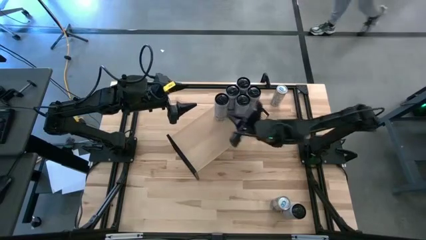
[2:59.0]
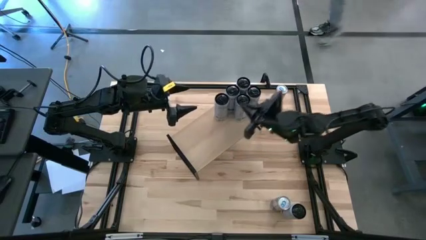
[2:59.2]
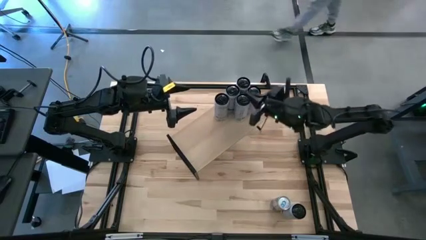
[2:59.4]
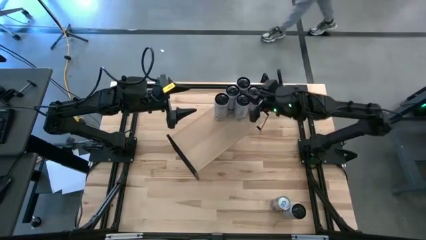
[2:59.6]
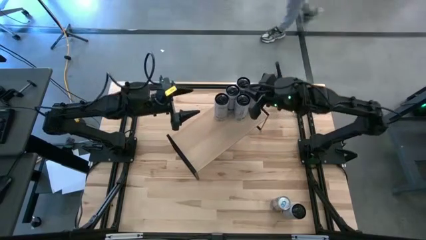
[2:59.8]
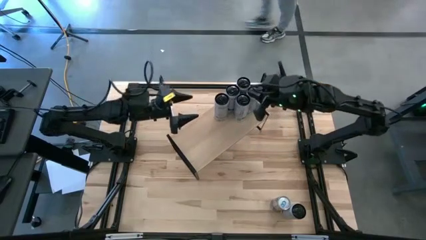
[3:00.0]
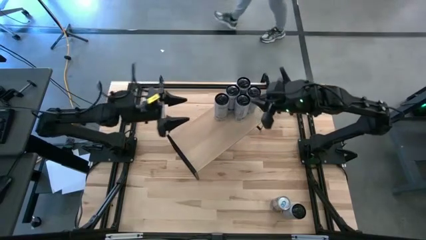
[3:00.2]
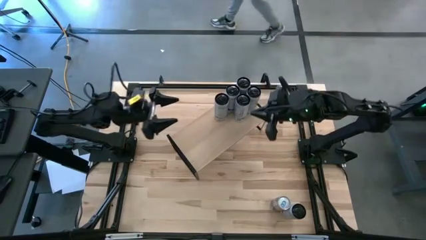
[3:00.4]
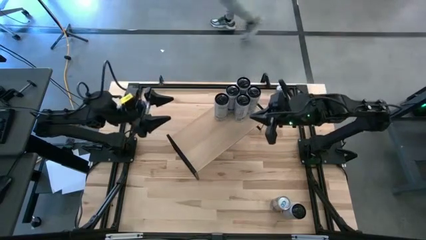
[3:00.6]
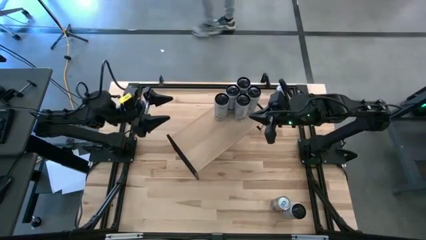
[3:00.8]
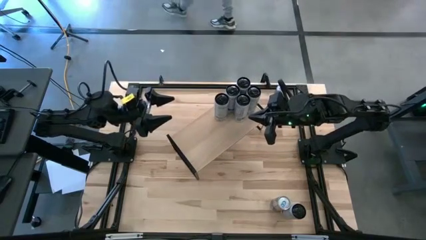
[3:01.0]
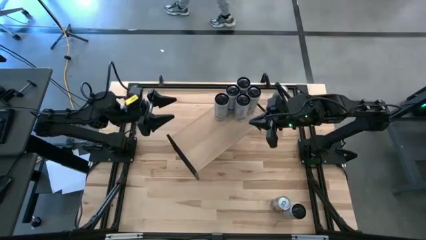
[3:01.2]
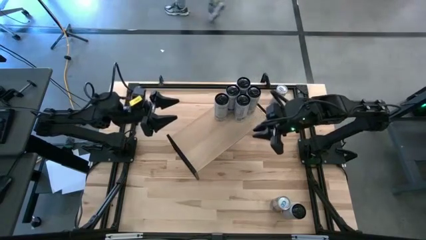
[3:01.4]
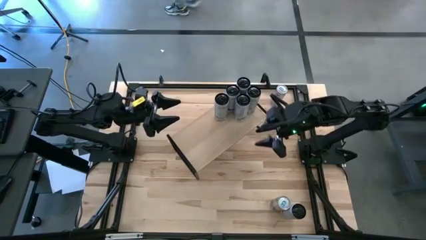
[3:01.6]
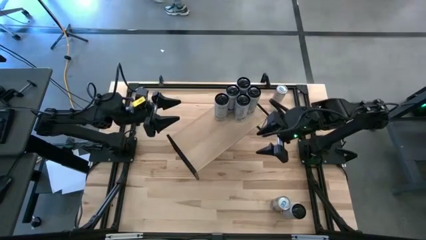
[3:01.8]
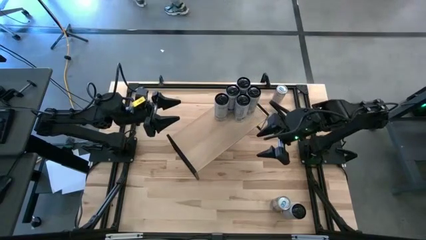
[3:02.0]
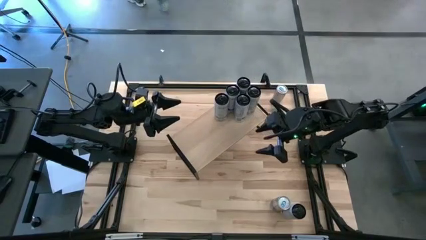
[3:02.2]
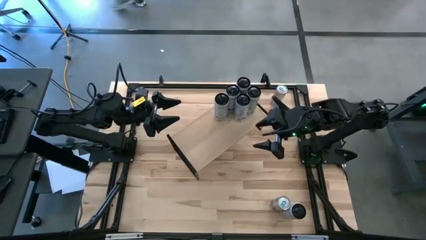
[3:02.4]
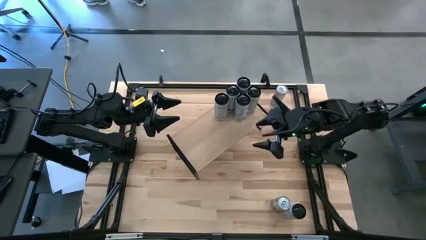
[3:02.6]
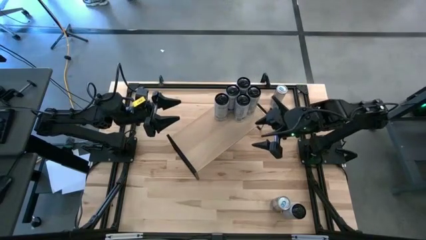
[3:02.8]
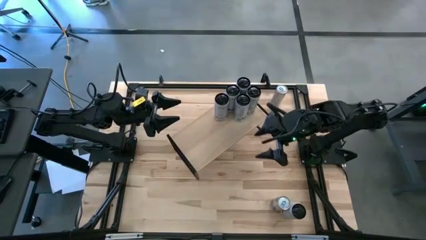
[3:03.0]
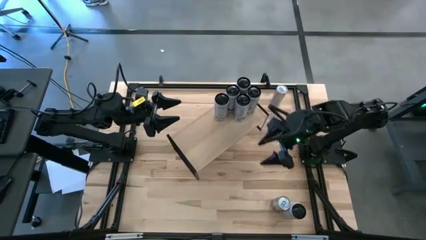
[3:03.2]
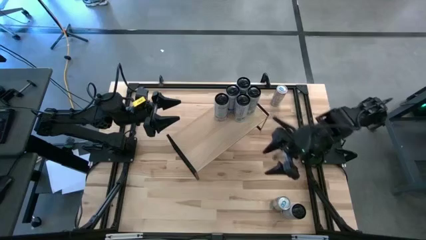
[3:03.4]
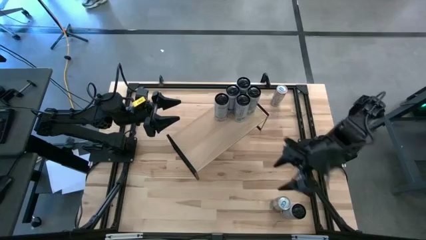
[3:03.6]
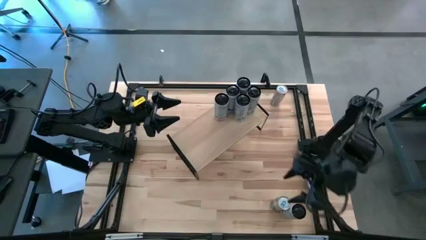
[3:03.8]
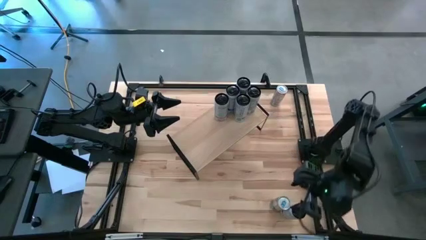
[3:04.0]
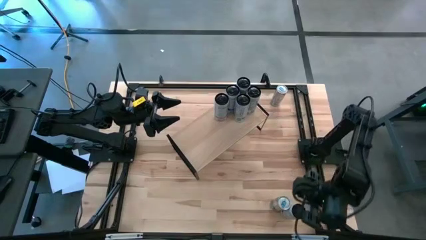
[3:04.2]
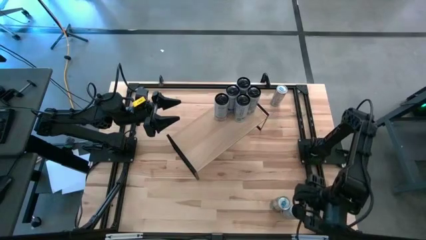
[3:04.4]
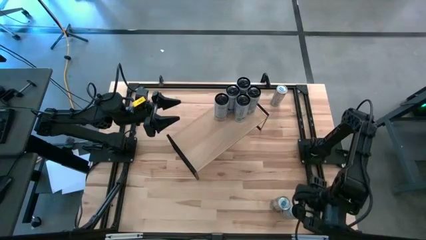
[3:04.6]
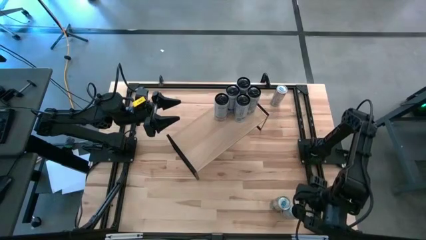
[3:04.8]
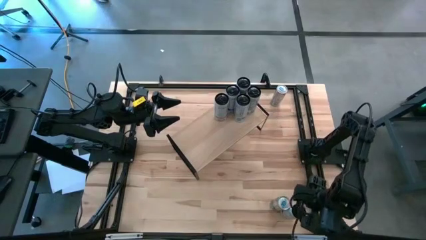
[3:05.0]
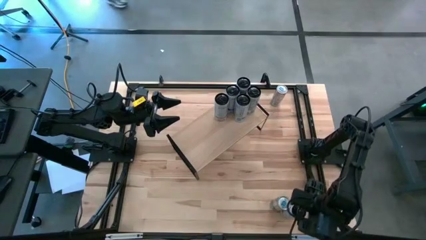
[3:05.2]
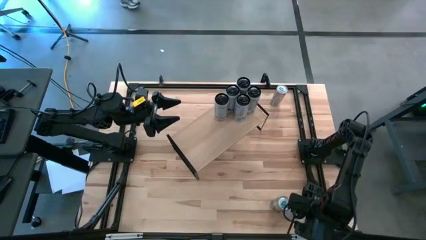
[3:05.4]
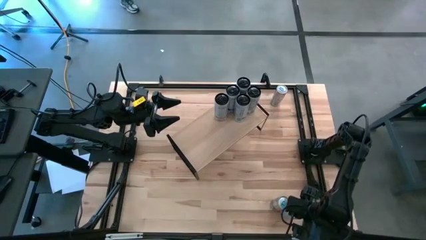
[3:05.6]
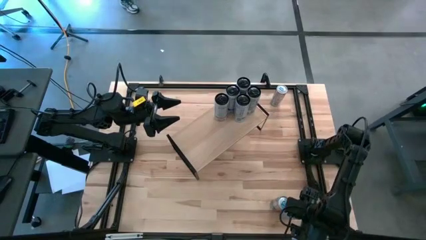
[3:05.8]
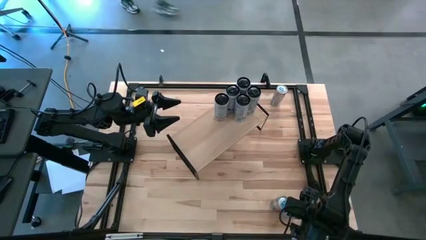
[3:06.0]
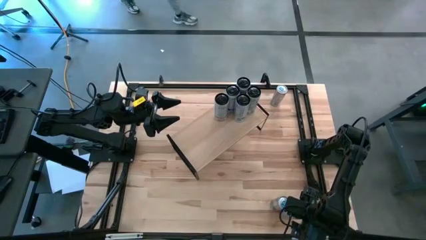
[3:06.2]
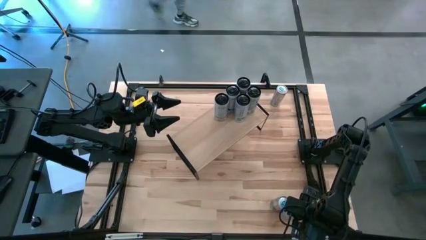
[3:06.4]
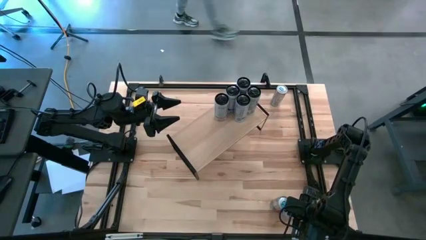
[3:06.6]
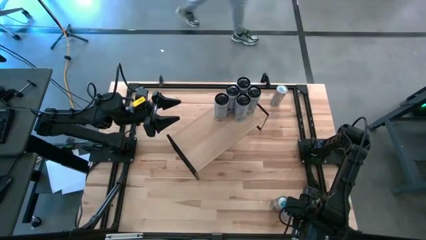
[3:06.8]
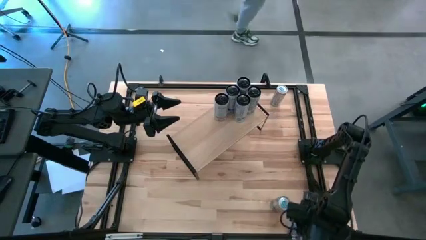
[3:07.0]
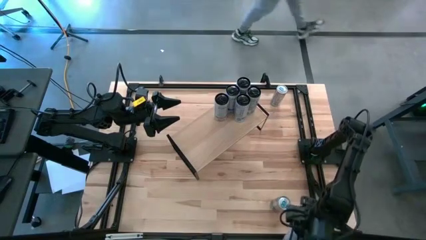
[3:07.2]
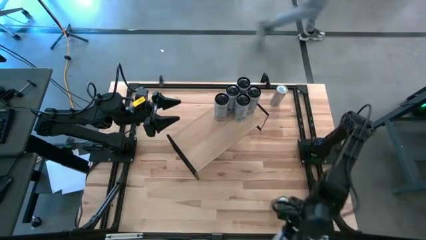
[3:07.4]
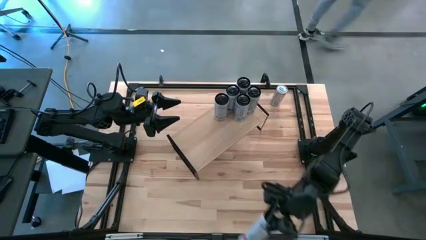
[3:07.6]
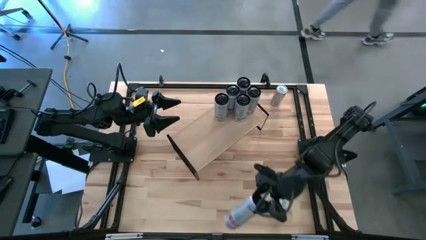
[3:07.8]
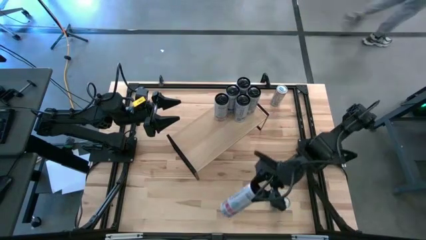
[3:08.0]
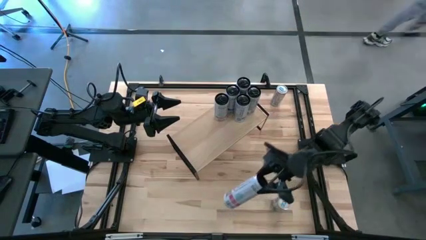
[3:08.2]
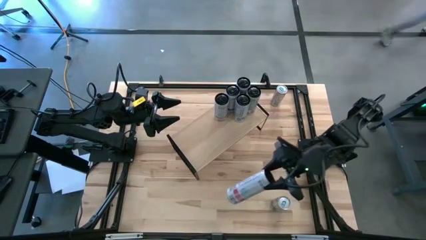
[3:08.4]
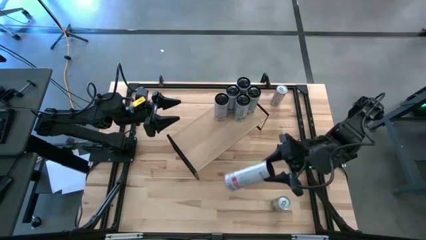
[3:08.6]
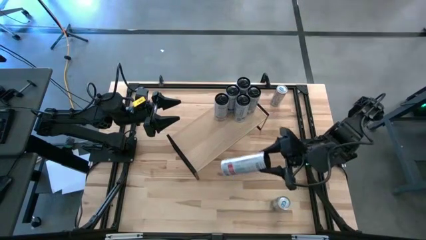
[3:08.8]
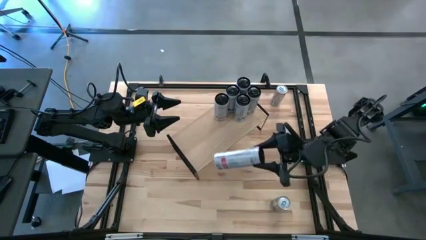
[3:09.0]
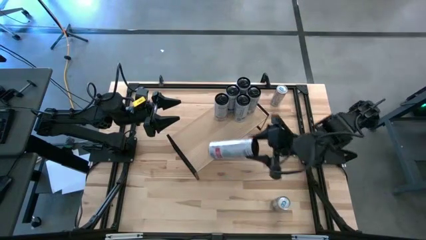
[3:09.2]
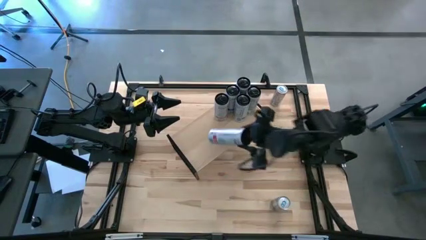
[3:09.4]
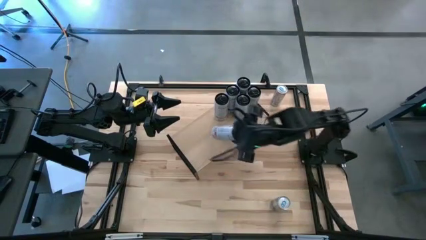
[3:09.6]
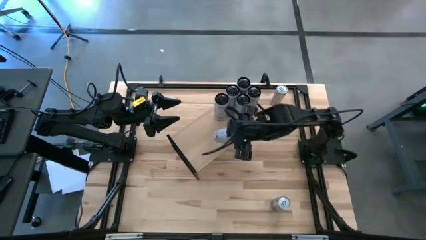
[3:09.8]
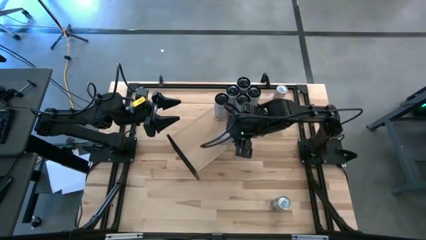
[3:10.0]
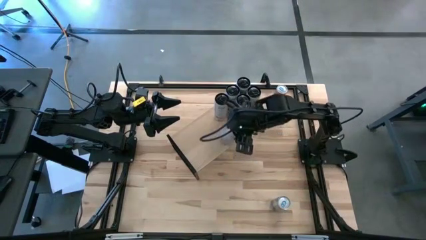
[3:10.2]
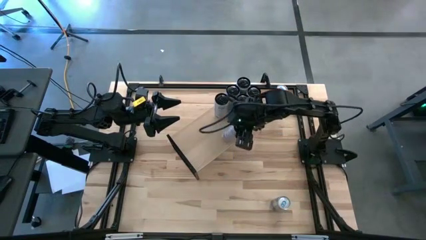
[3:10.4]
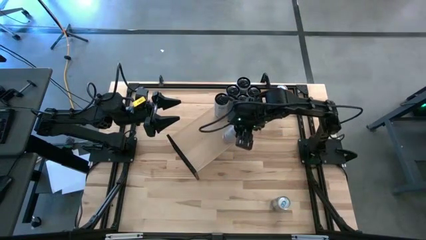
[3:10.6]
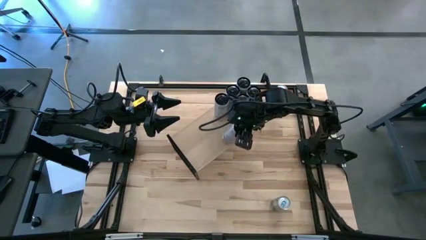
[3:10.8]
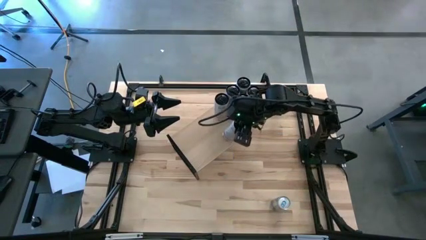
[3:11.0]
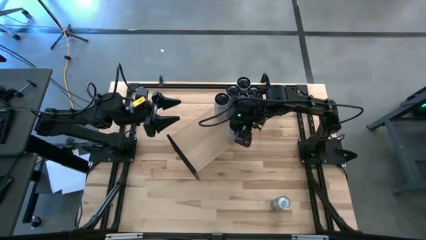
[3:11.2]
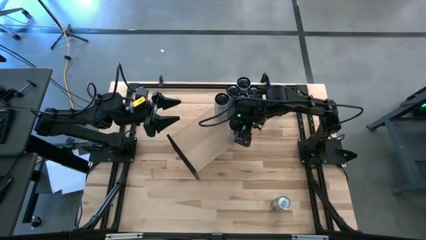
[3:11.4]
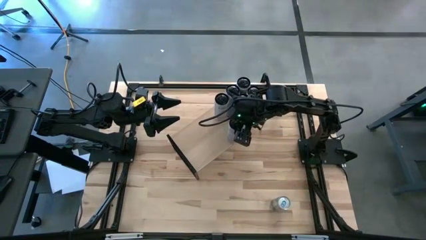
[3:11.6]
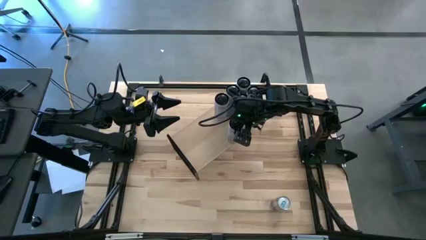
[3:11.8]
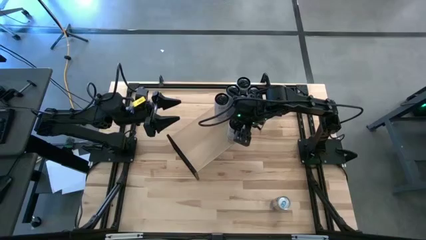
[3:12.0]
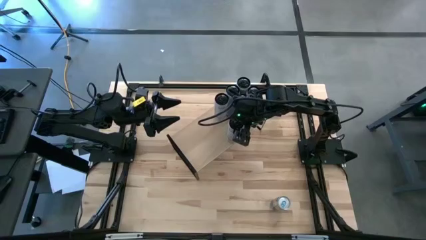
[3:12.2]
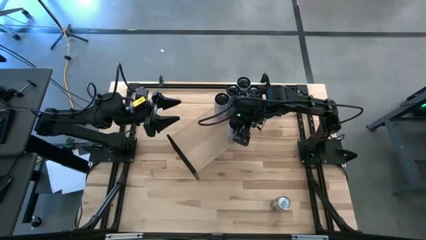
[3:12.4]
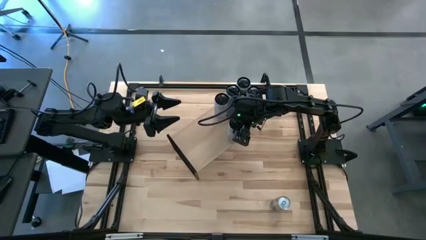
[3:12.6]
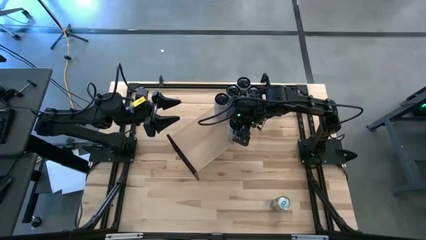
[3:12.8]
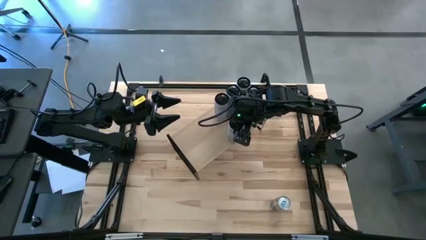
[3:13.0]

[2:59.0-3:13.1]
Task: Place canned beverage on shelf
Put the white-pink soda can on the shelf and align it with the other white-pink soda can
